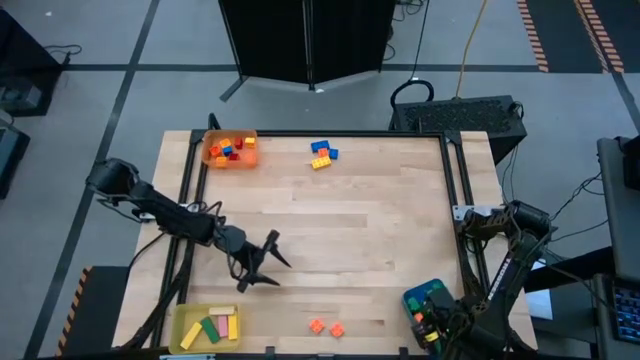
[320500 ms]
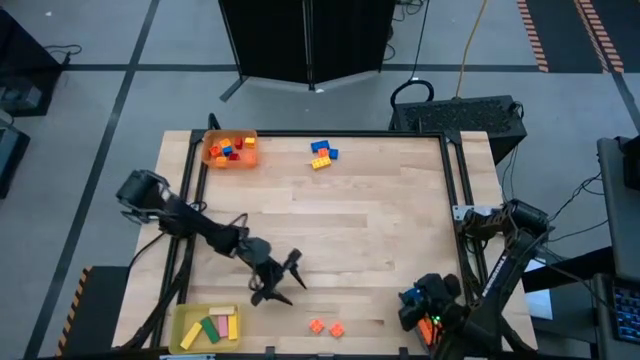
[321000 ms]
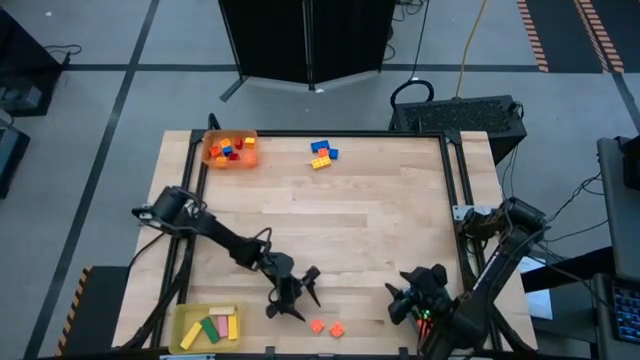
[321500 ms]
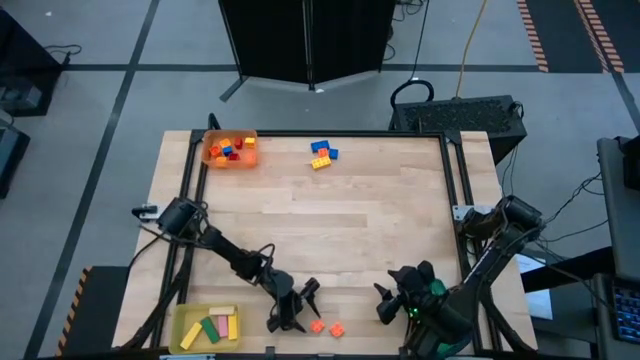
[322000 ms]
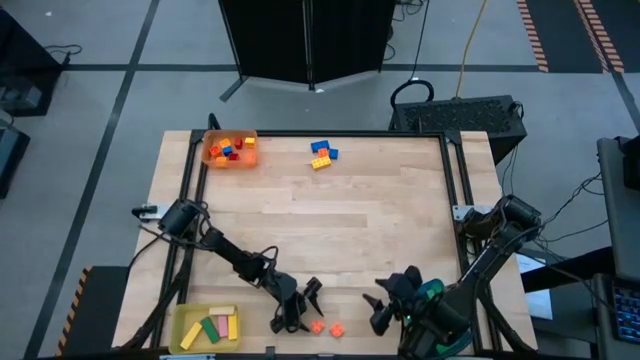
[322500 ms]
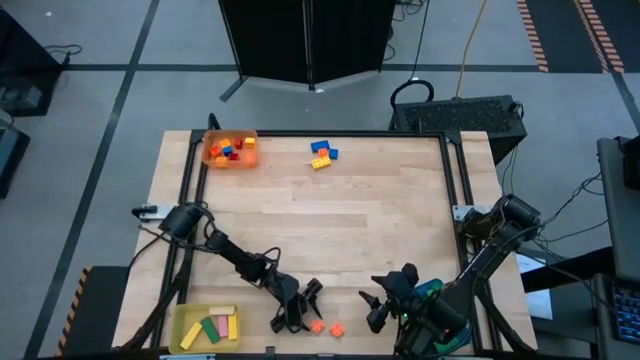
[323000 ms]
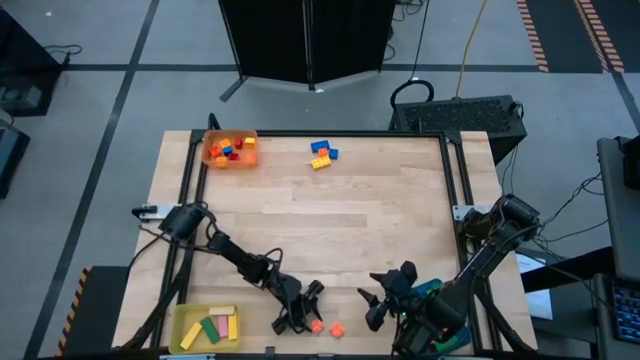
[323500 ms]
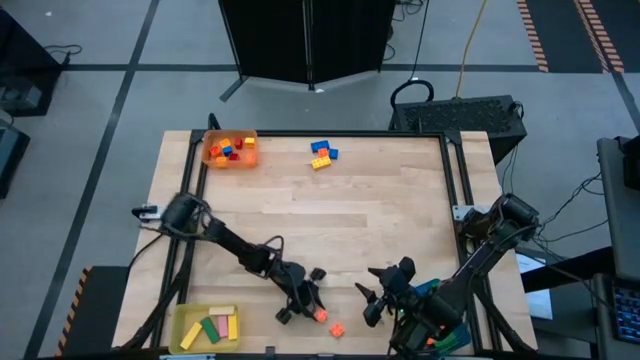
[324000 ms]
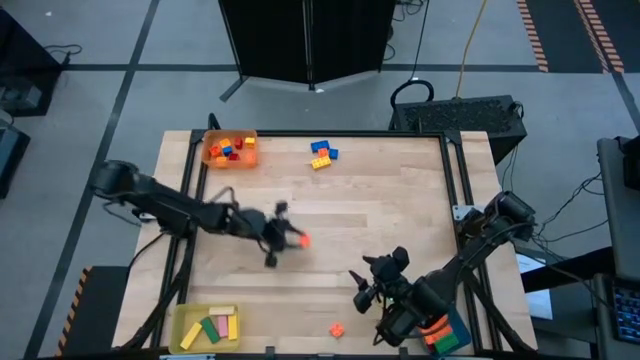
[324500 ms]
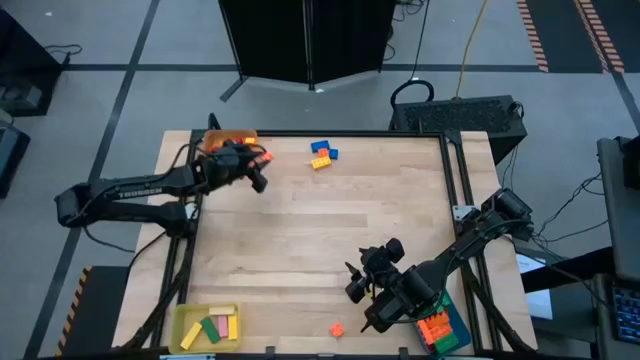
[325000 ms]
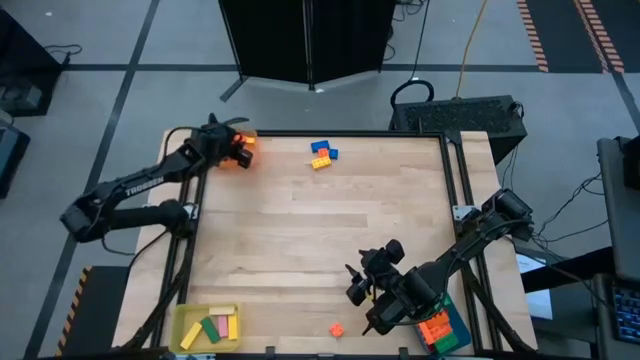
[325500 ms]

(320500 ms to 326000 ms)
Task: Sort blocks by size
Put the orange 4 stud game piece into the orange bin

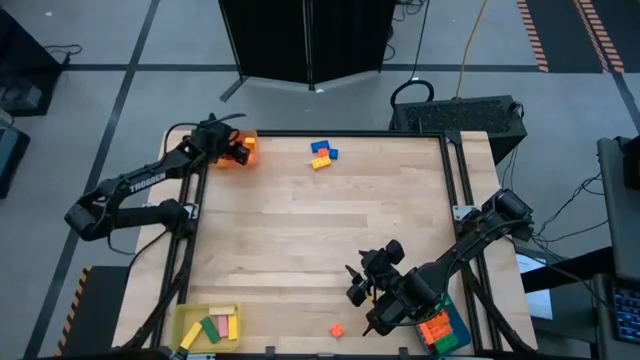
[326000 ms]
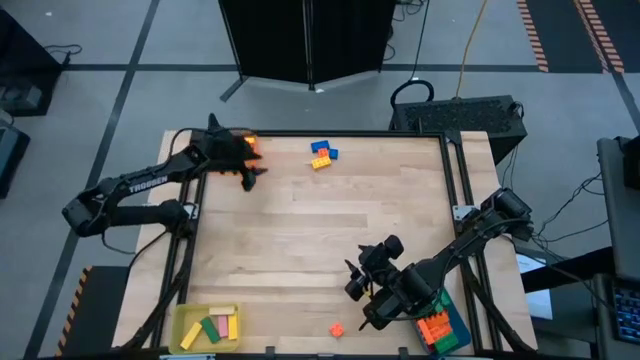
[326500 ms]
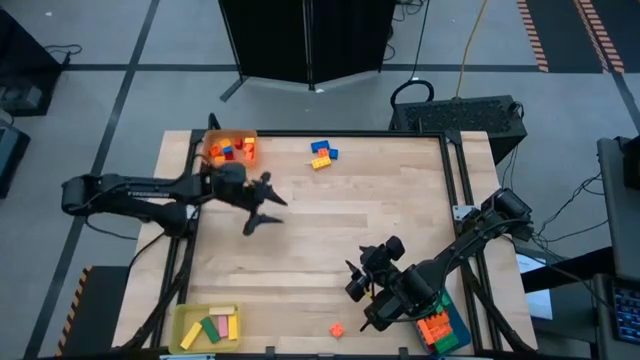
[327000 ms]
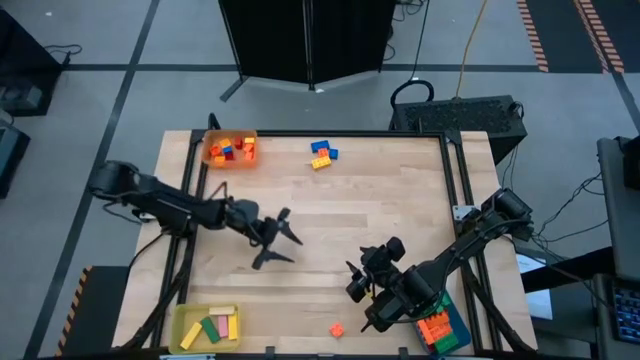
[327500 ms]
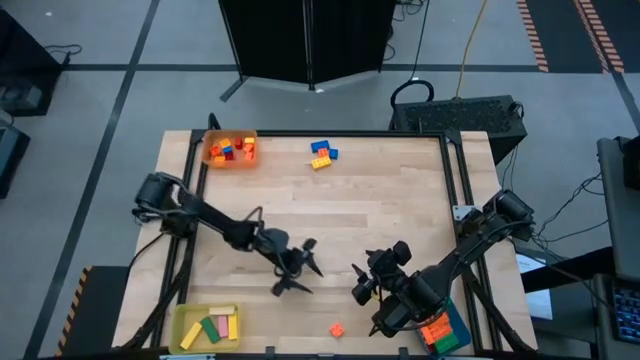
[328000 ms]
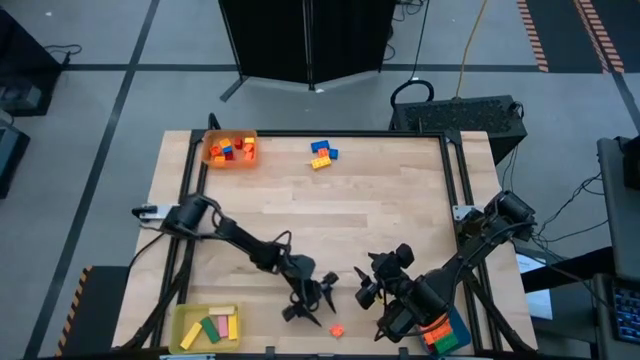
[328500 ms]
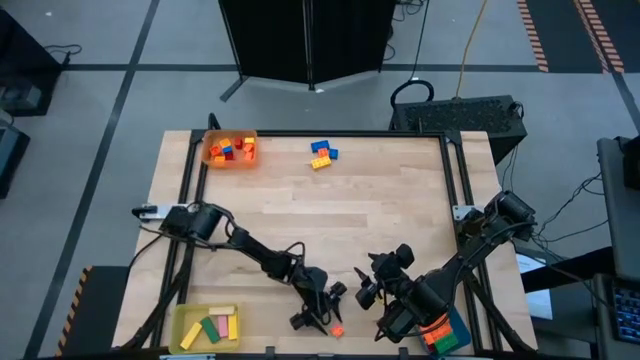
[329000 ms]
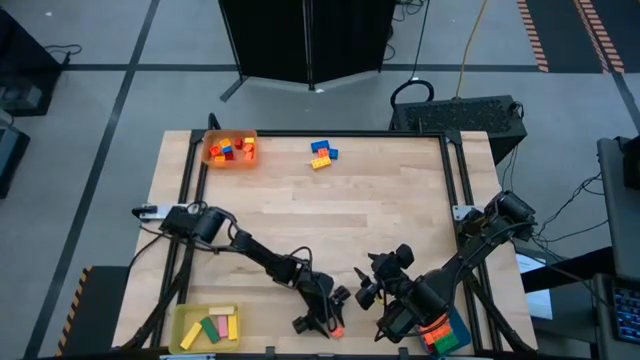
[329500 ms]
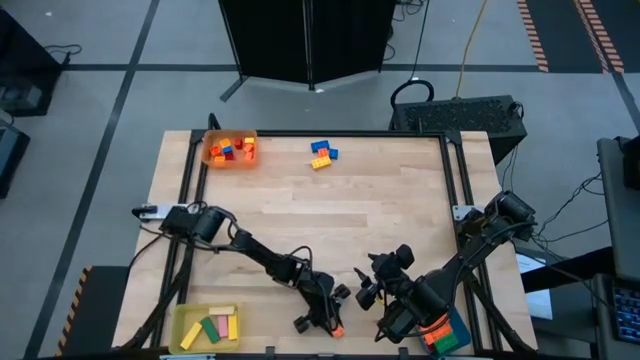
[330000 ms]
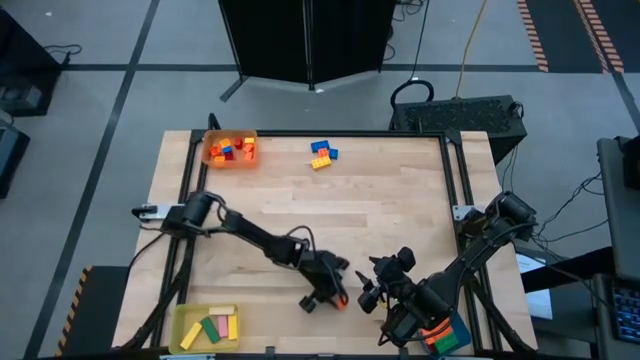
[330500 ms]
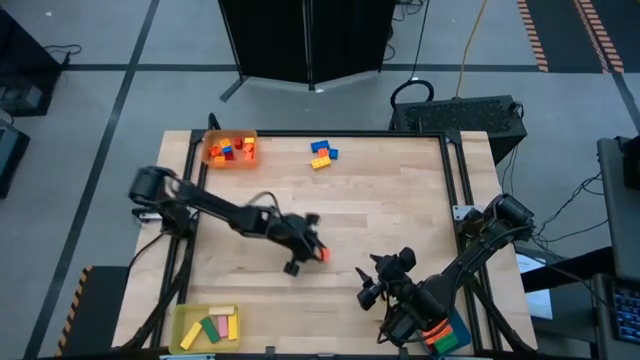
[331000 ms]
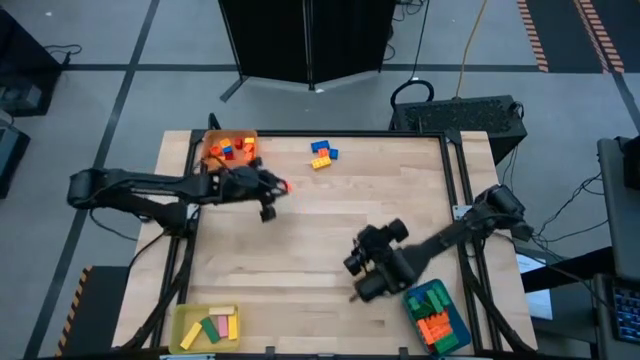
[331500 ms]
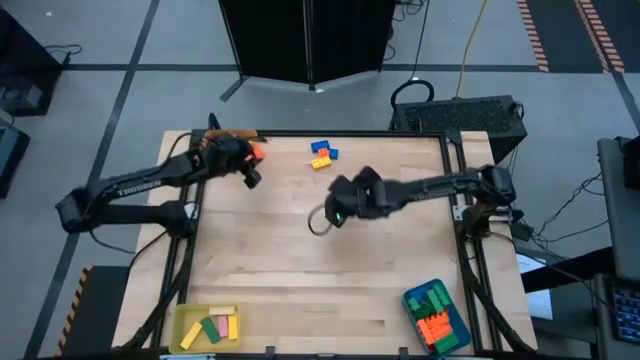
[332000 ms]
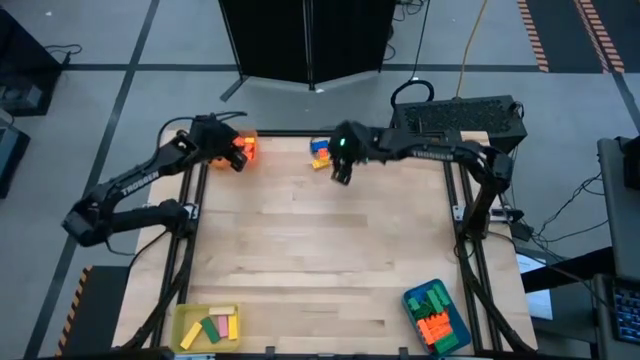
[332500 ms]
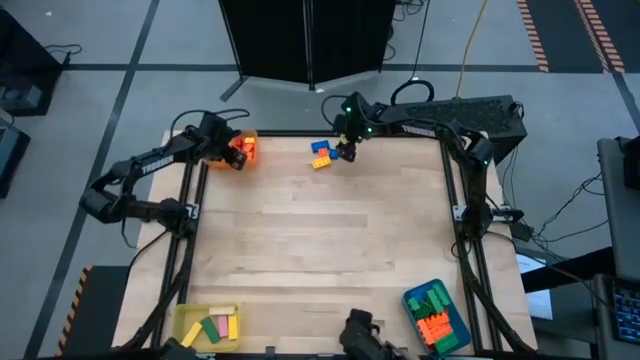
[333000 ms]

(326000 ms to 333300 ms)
Put the orange 4 stud game piece into the orange bin

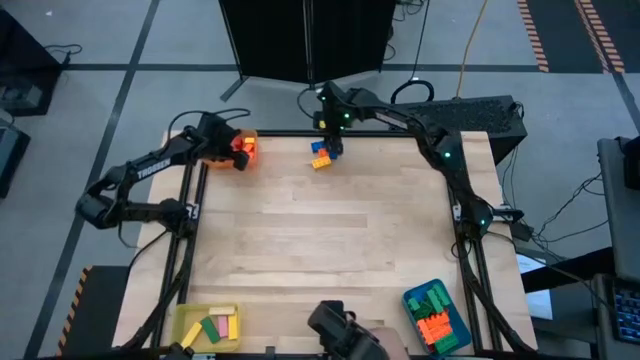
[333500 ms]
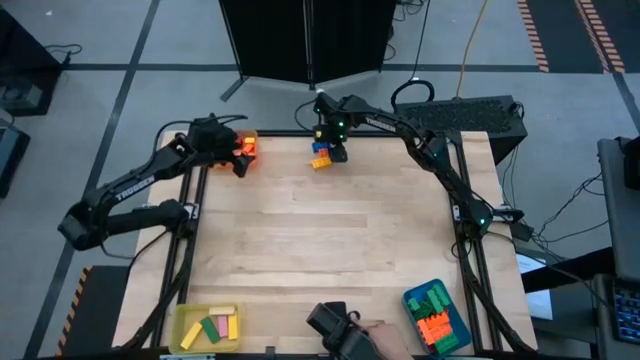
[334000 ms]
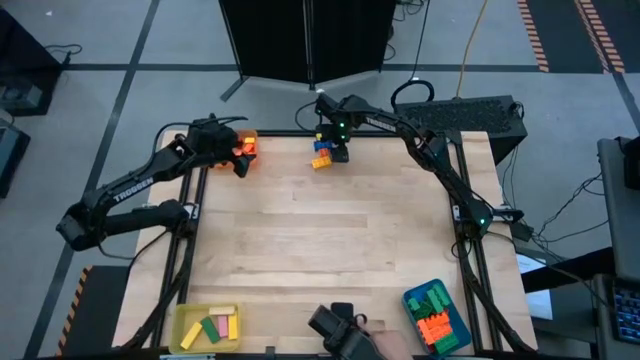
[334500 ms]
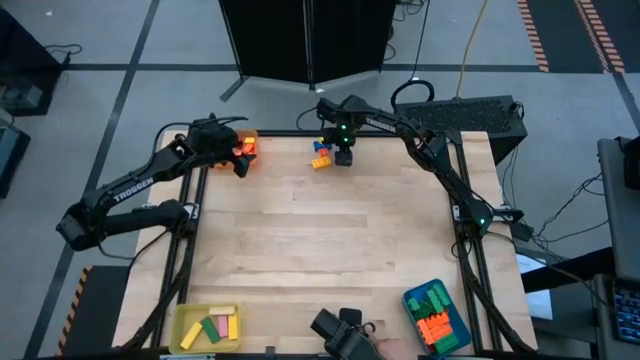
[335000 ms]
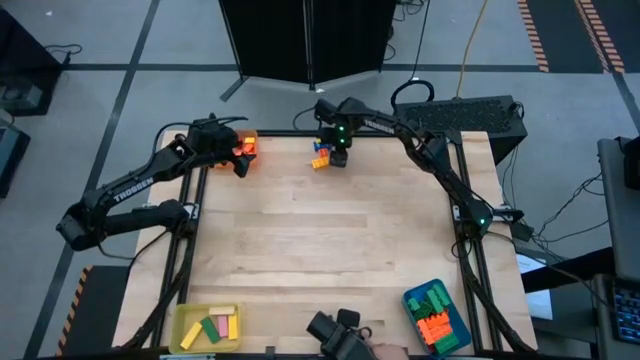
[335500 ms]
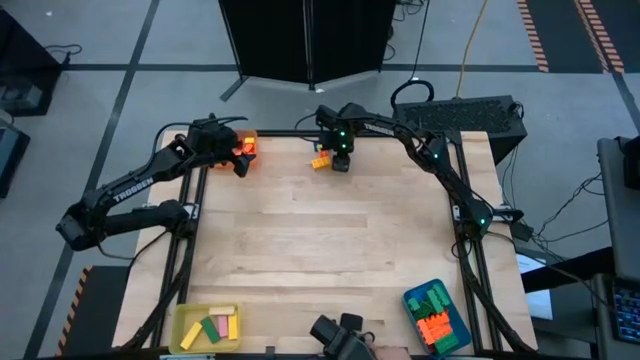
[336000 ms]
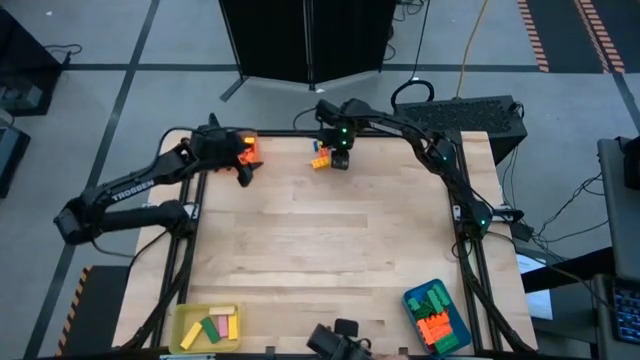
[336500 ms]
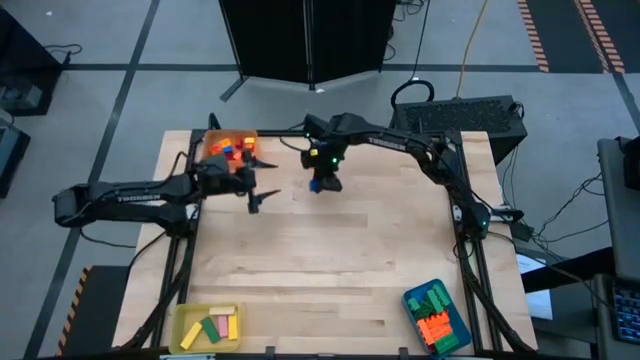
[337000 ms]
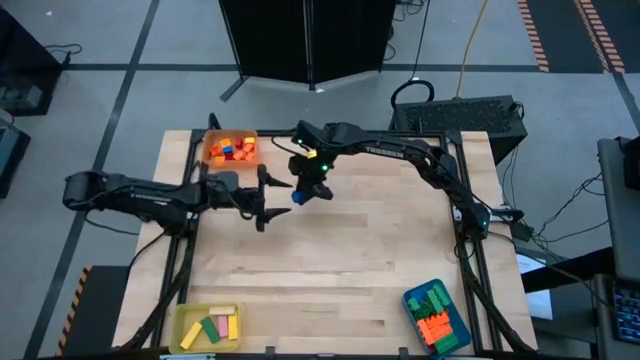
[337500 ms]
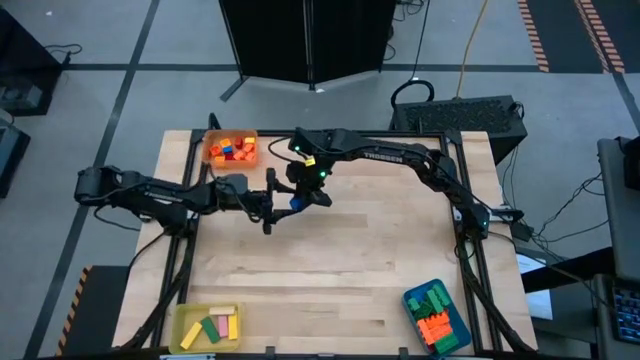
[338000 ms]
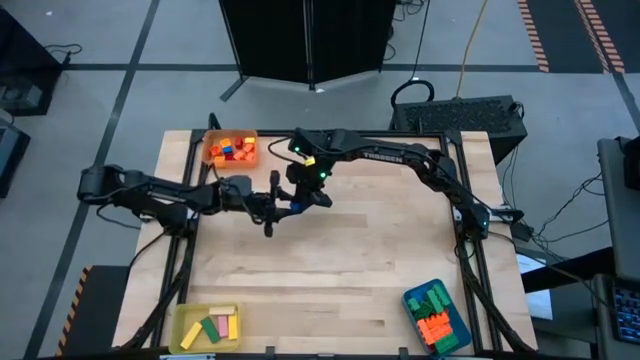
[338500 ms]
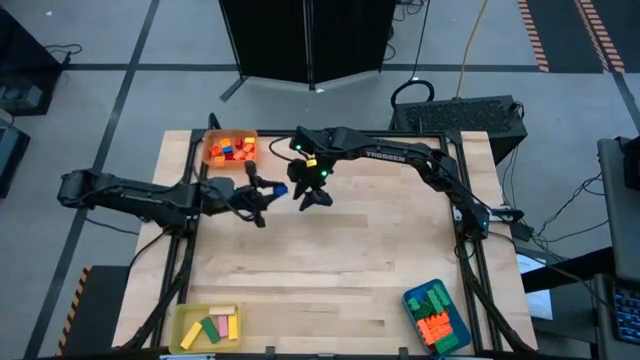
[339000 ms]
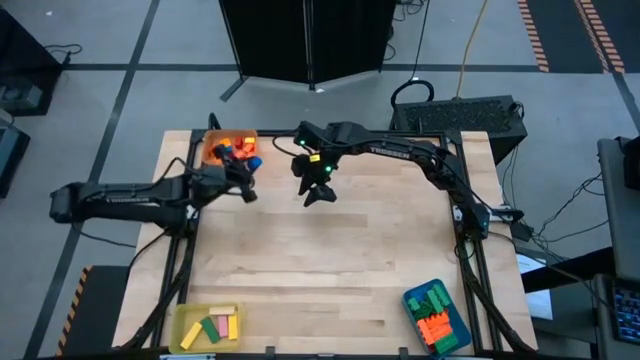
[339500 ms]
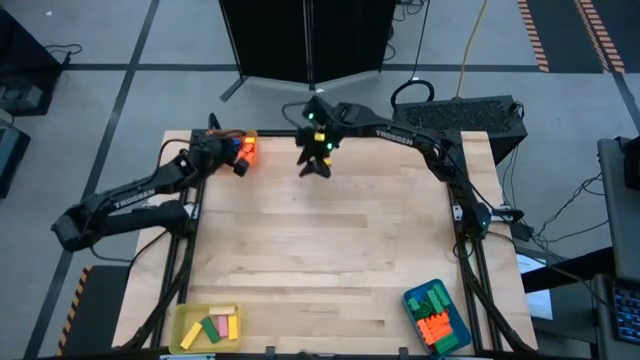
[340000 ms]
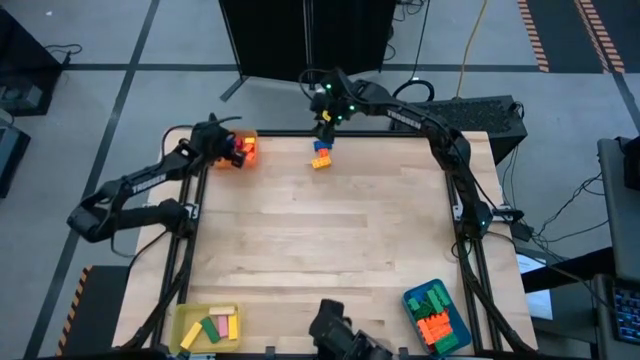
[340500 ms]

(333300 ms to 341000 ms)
Put the blue 4 stud game piece into the orange bin
